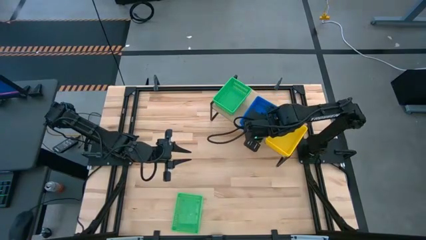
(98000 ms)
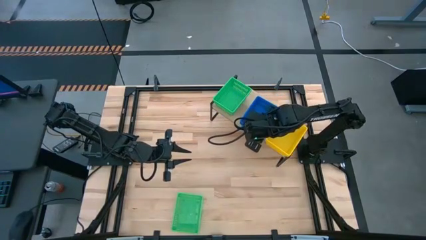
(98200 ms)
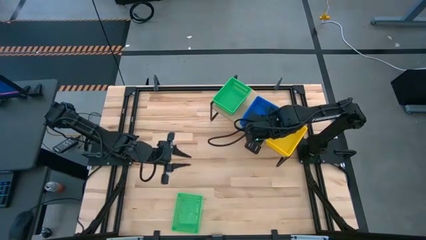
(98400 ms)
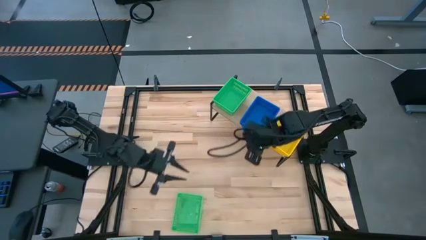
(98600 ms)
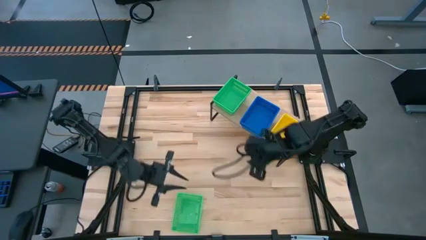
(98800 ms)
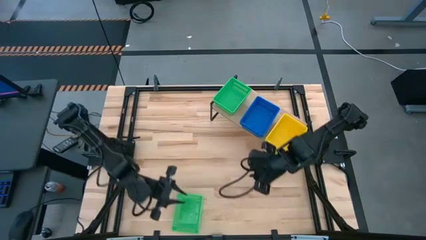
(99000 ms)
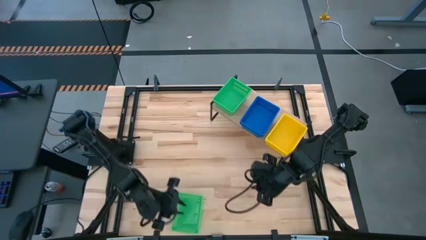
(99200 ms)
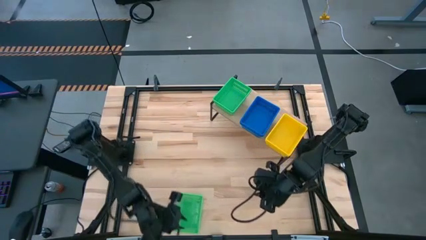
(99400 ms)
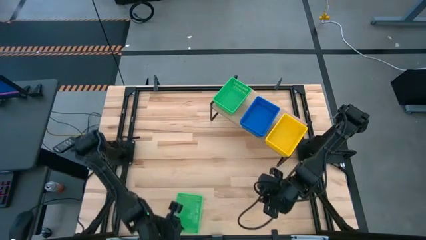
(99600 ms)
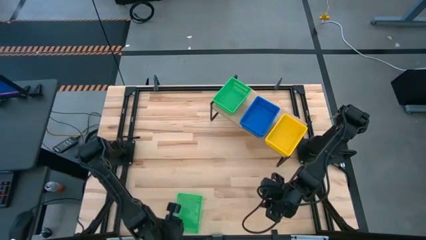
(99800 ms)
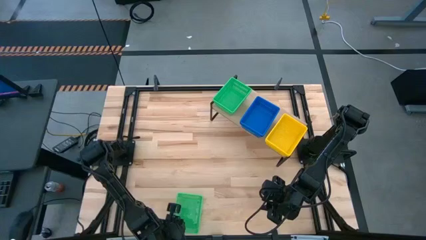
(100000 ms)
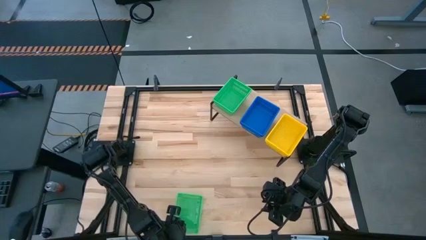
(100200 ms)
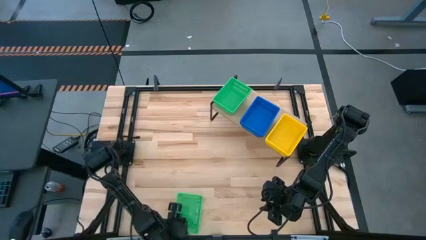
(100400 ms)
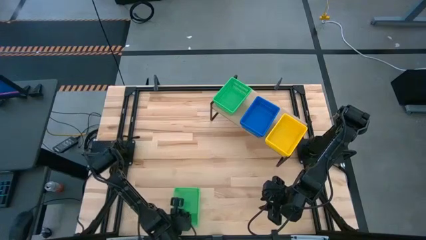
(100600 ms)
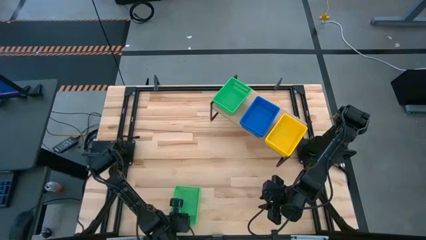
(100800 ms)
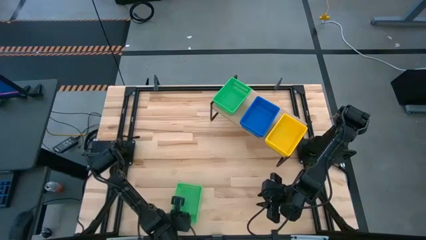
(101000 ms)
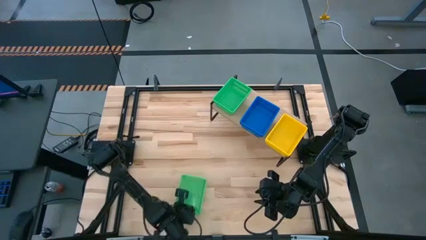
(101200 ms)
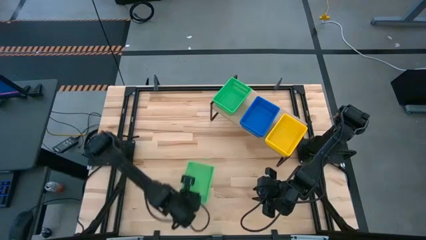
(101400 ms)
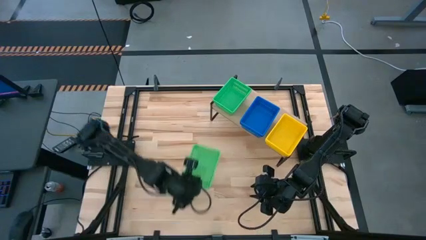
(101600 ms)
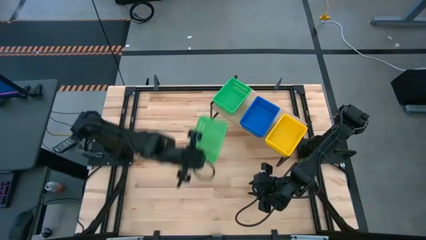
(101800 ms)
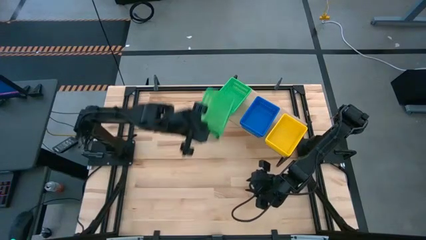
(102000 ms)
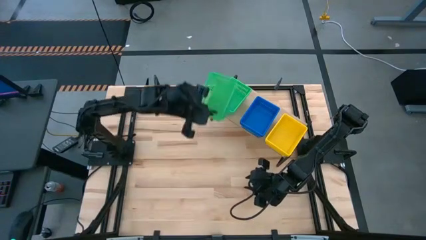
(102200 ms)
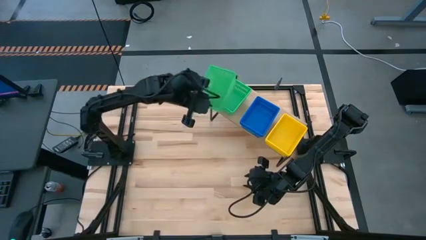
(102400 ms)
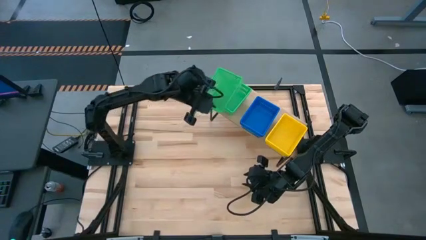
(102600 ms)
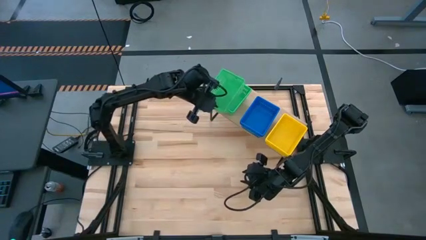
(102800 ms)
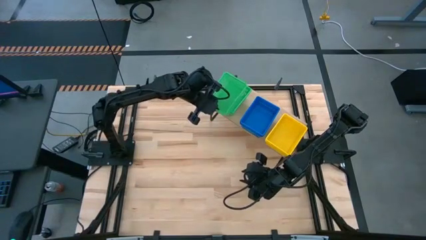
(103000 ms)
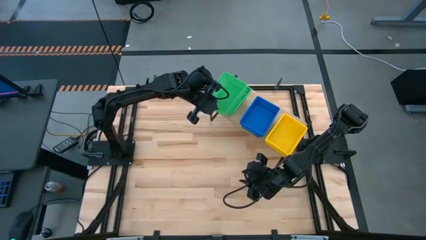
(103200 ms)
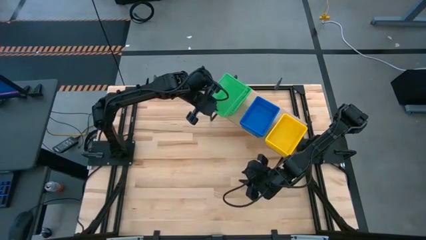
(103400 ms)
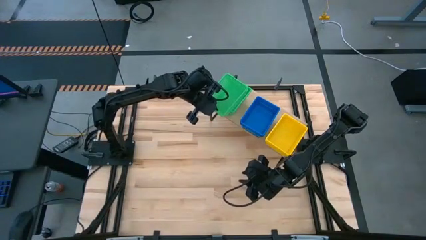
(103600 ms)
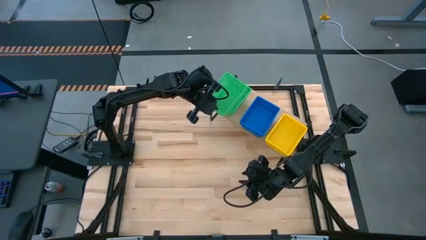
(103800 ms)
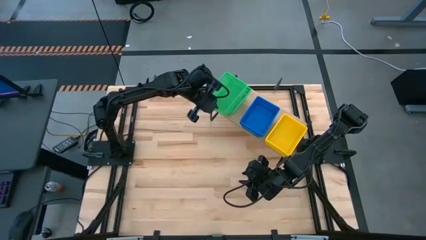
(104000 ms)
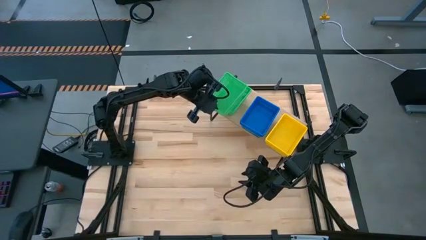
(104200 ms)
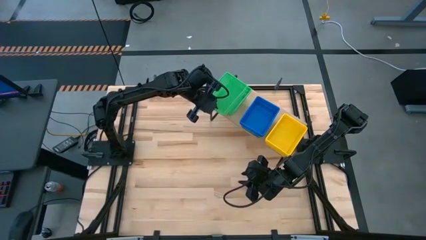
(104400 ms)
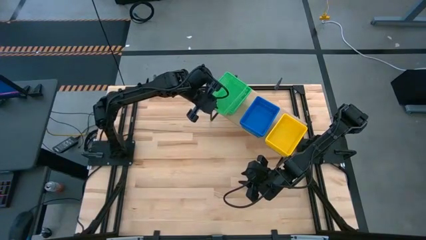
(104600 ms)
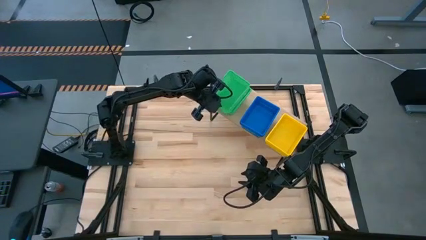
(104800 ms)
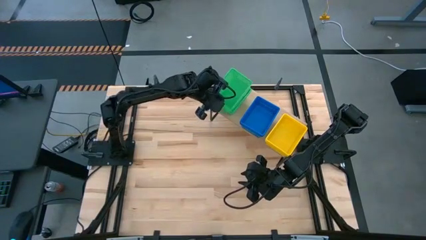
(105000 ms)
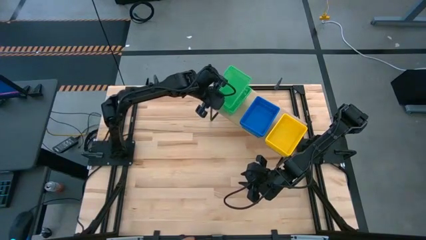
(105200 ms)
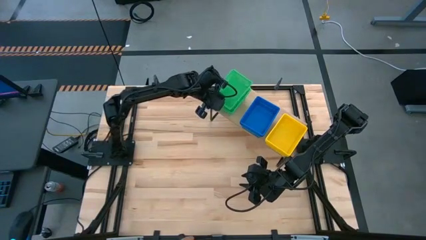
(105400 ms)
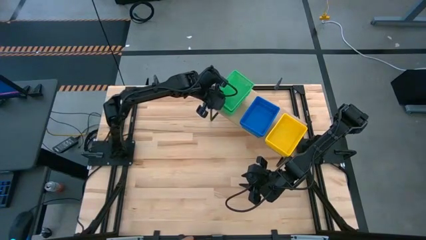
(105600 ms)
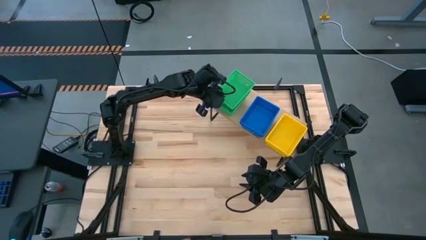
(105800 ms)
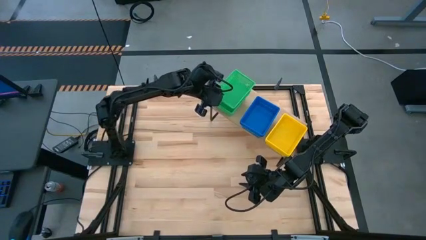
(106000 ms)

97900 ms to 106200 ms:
Task: Stack baskets on shelf by color
Stack the green bin on top of the green bins on the shelf

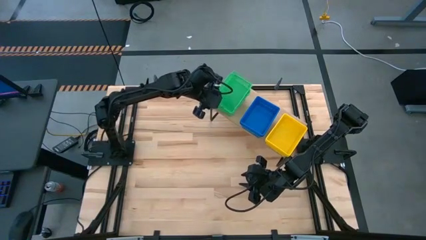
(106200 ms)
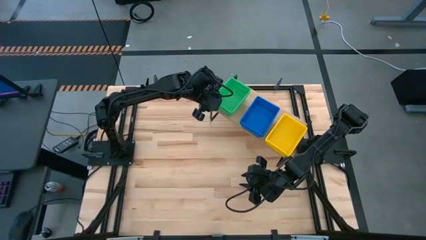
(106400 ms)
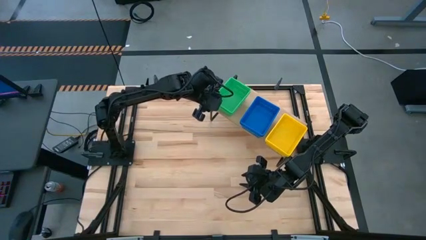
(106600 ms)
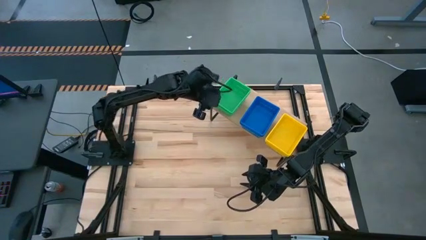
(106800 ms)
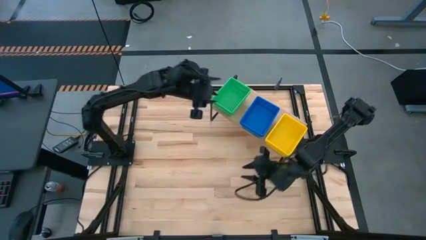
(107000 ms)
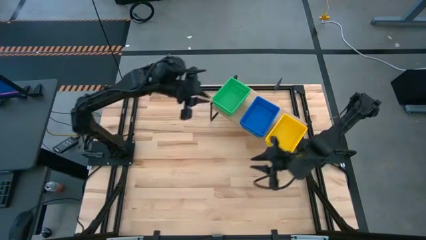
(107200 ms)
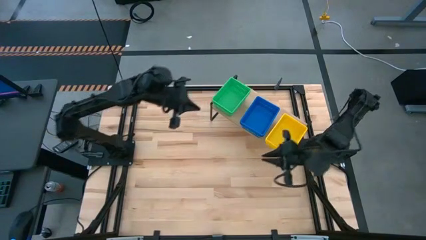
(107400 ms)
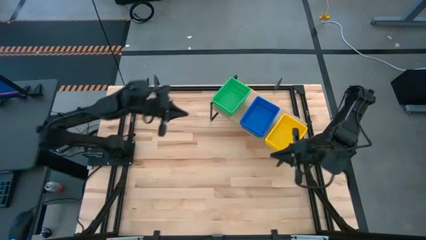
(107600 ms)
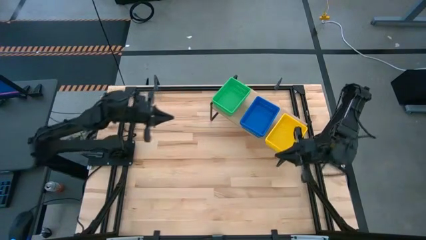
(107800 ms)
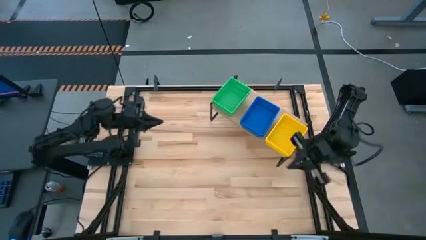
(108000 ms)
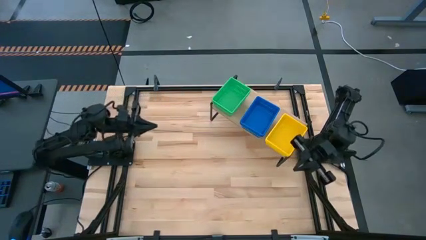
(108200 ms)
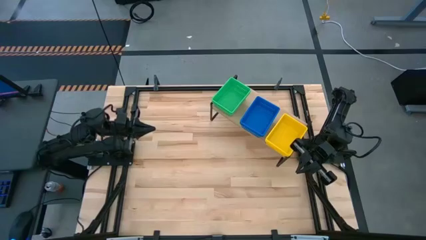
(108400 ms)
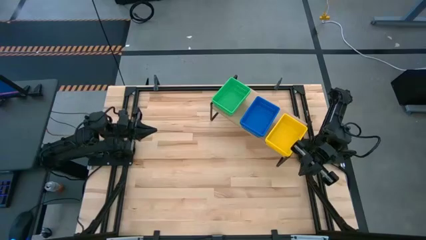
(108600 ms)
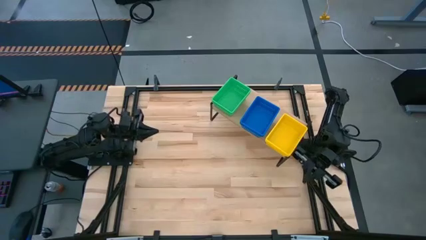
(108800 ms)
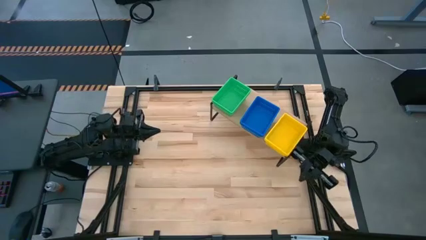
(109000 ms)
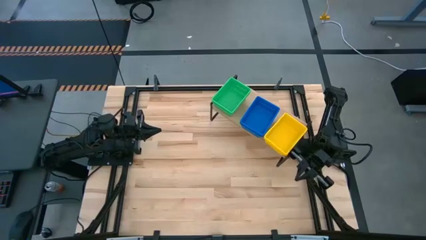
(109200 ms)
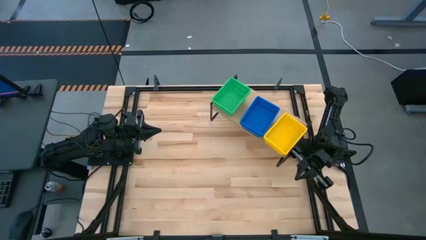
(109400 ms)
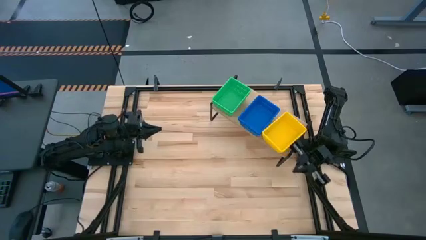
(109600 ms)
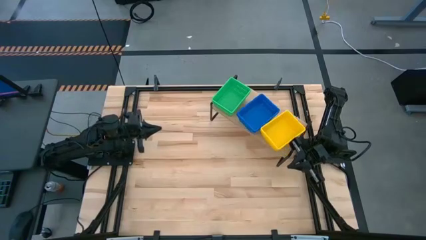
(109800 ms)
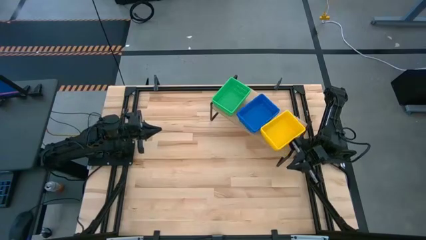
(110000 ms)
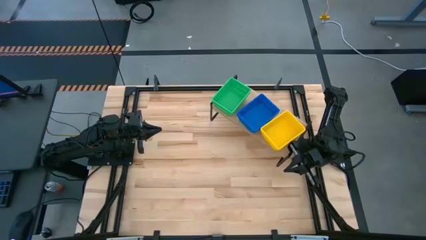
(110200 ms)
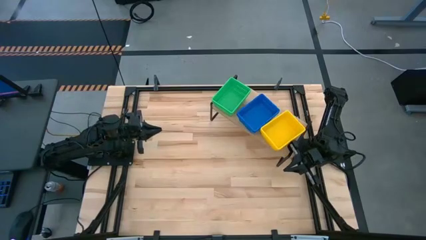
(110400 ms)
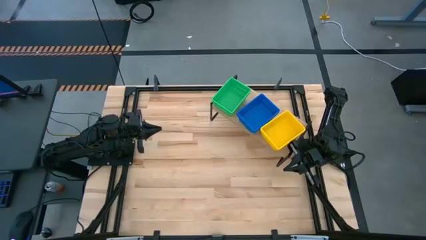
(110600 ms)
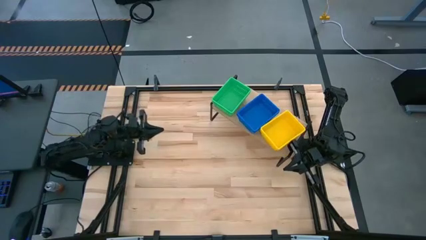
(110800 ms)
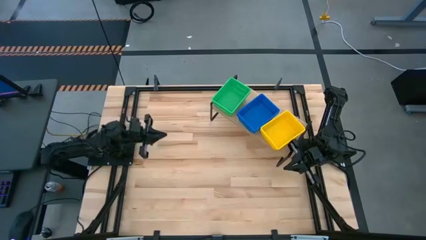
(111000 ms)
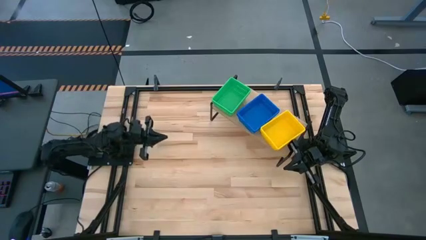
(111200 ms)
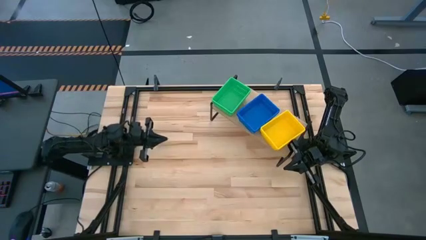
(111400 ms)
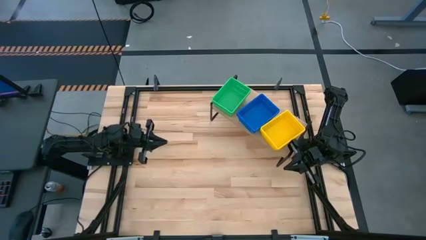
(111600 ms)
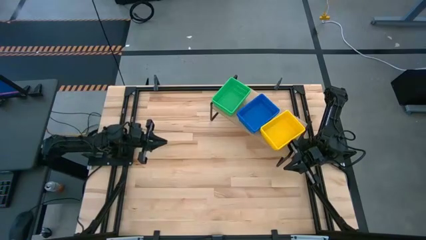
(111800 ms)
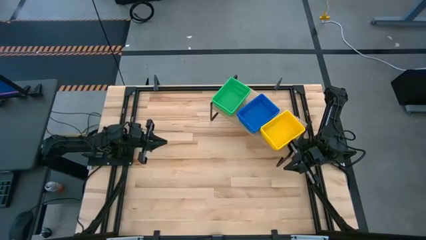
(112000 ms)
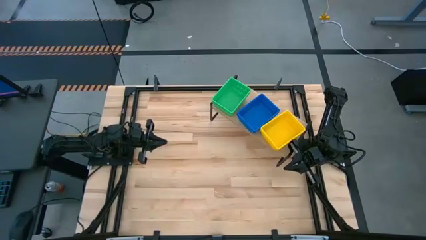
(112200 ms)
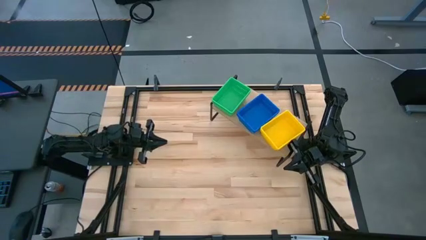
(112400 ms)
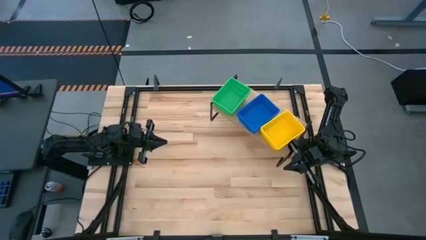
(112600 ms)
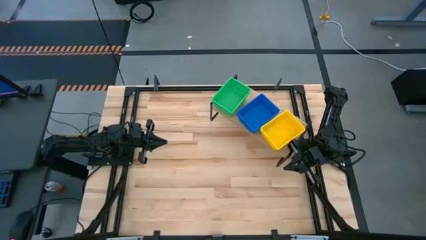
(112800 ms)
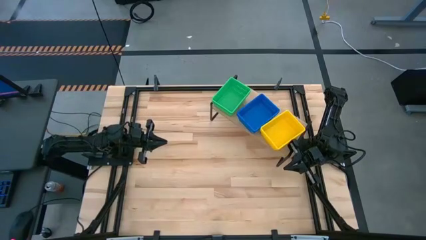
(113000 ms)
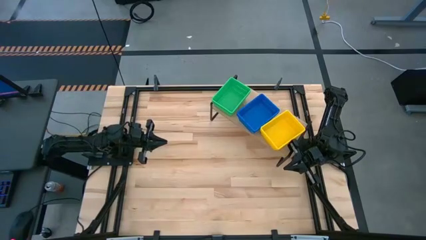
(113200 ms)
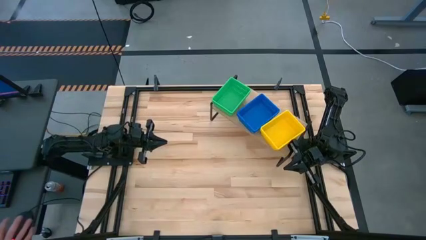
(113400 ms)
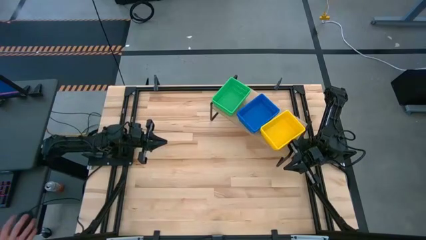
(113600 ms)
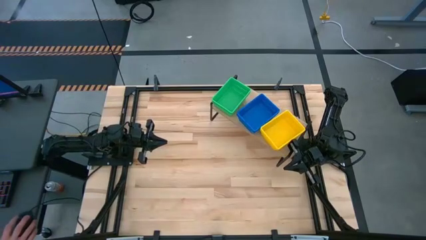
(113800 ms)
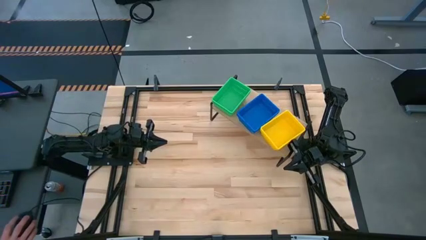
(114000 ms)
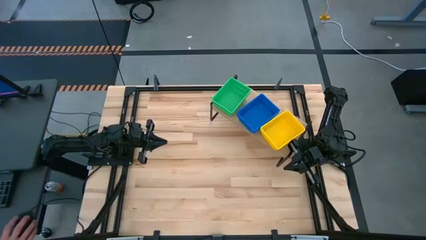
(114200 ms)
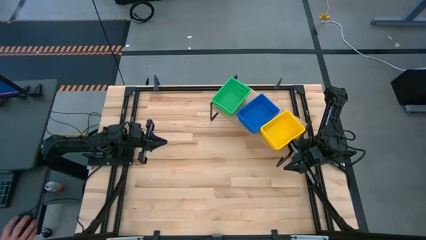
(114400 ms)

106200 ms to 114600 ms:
Return to Home Position

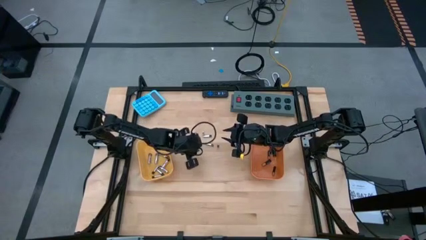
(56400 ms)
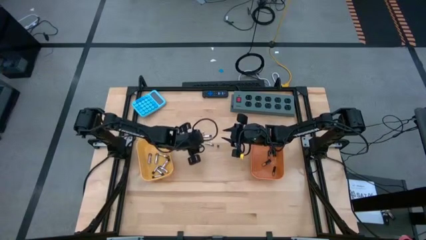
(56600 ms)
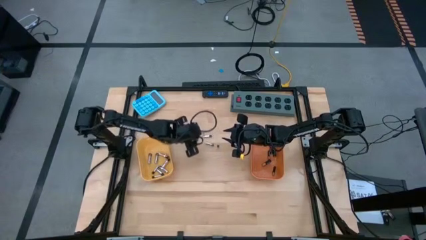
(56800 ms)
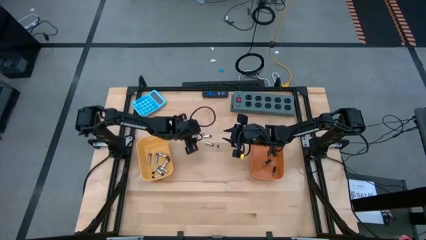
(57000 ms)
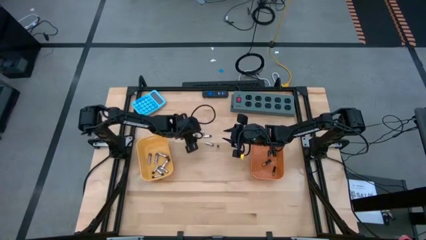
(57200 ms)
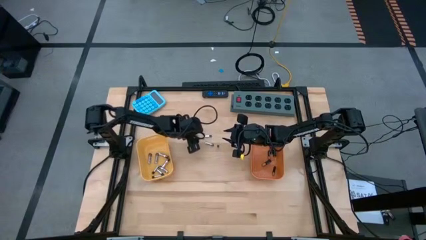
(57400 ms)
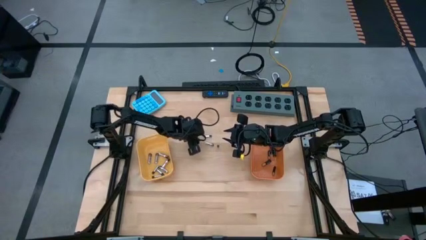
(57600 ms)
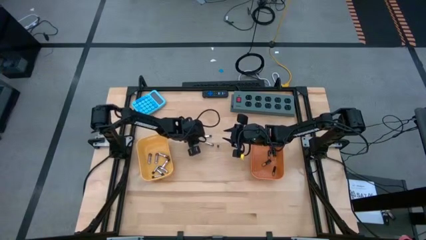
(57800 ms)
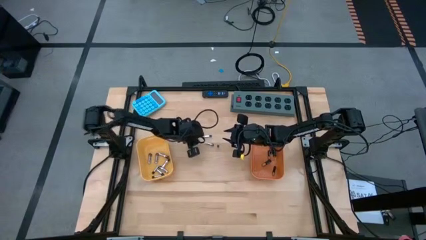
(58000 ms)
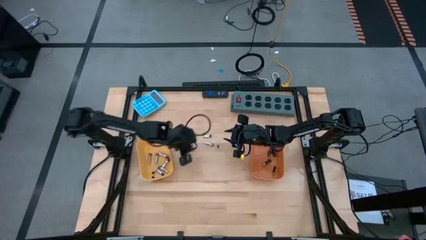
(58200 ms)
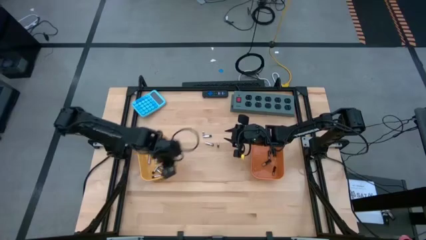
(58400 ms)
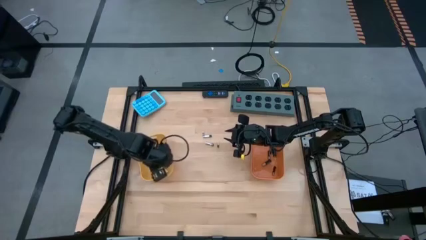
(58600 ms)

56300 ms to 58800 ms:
Task: Sort batteries
Put the silver battery into the yellow bin
